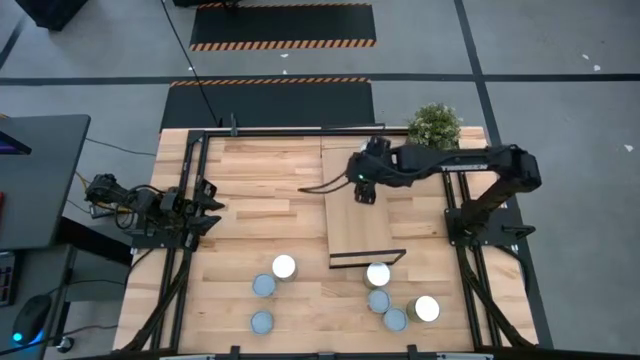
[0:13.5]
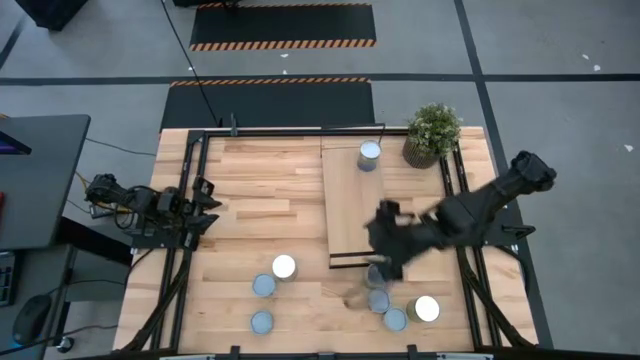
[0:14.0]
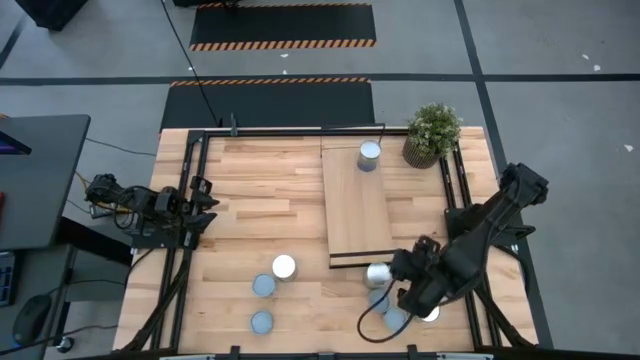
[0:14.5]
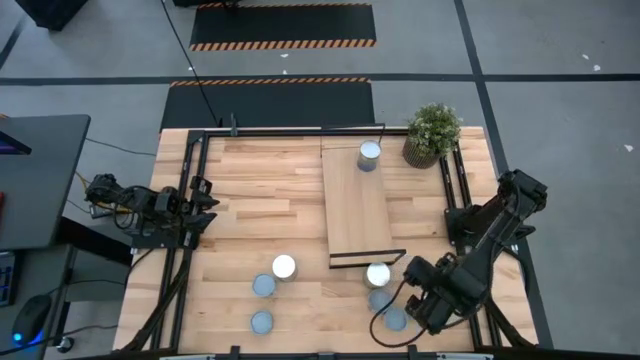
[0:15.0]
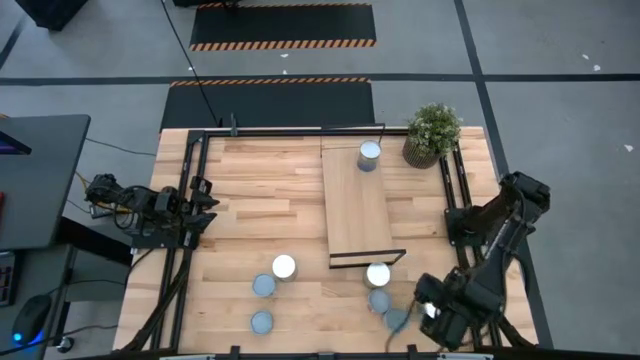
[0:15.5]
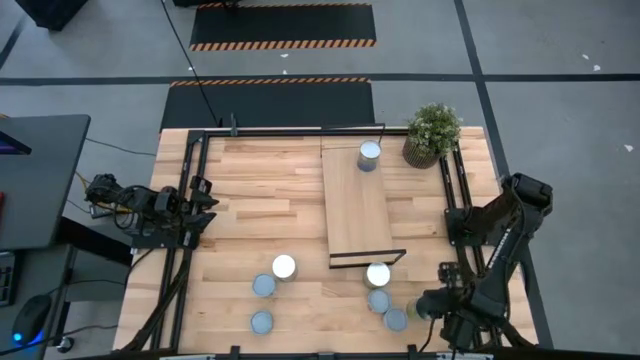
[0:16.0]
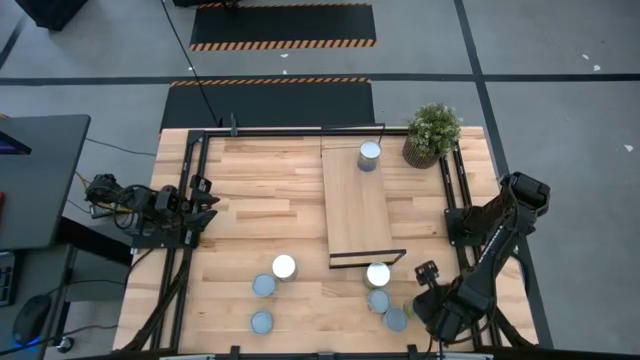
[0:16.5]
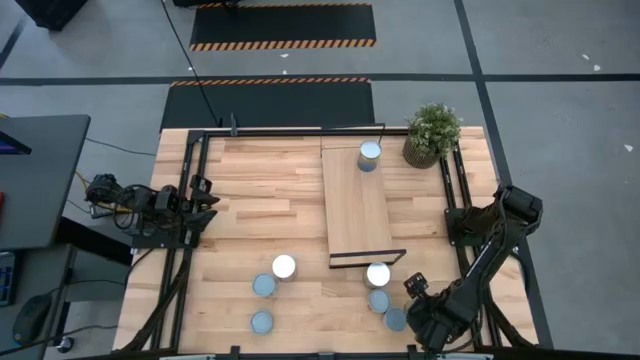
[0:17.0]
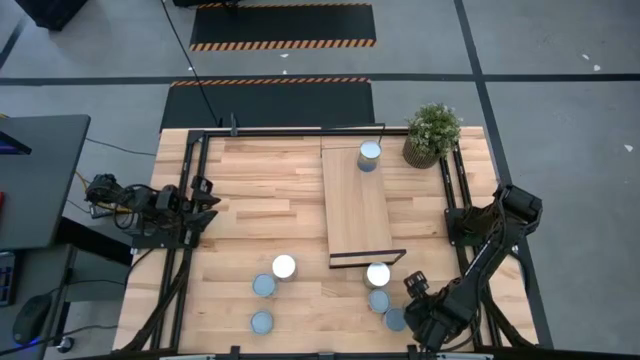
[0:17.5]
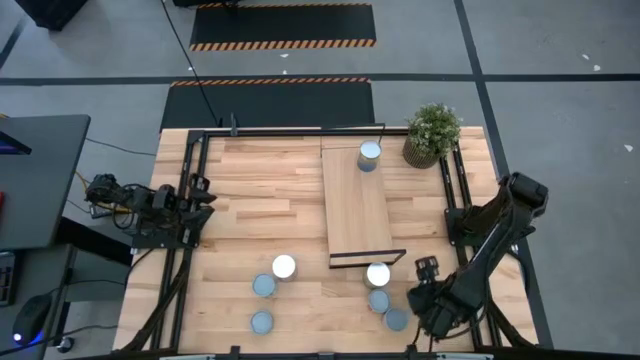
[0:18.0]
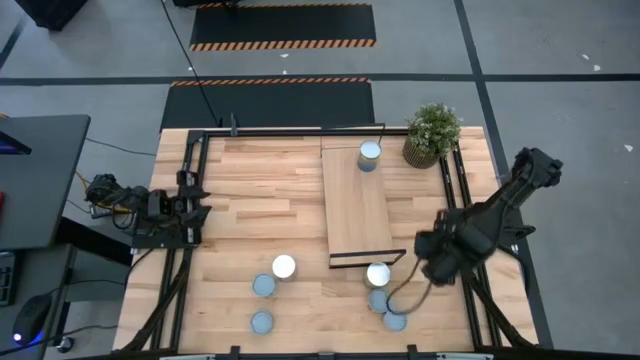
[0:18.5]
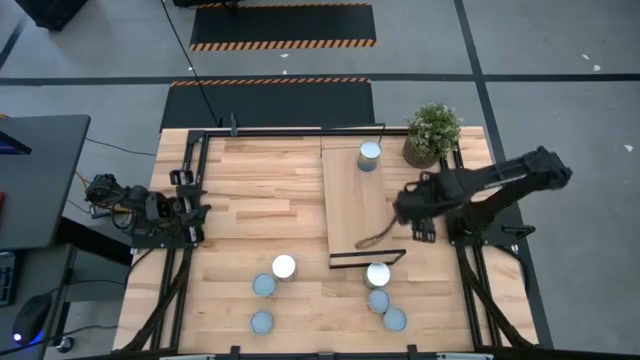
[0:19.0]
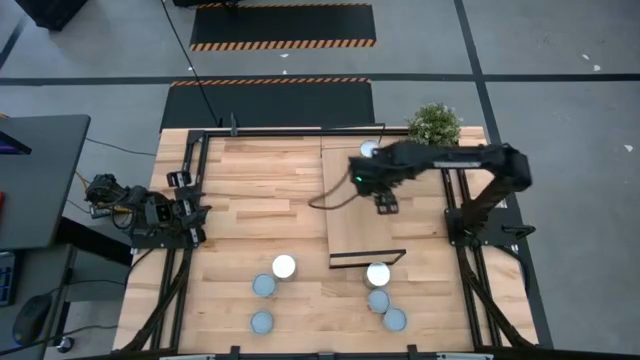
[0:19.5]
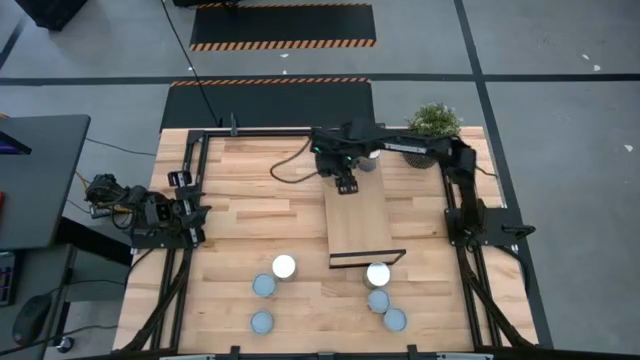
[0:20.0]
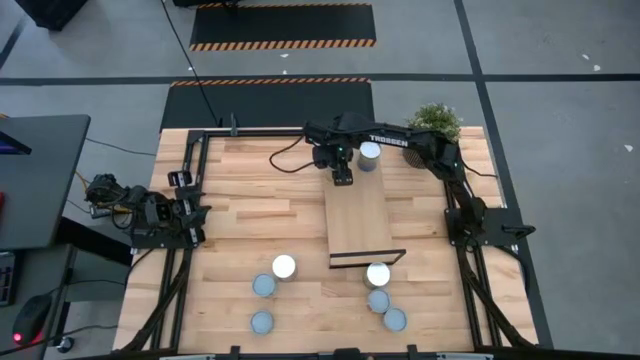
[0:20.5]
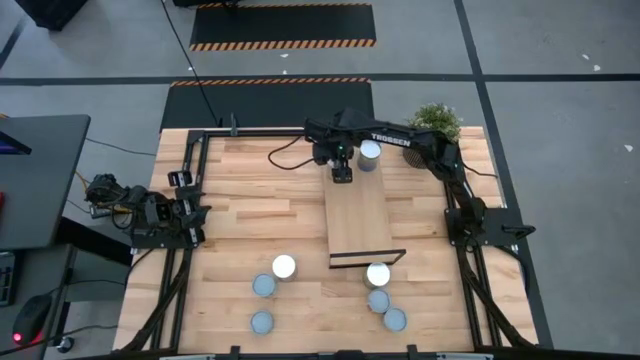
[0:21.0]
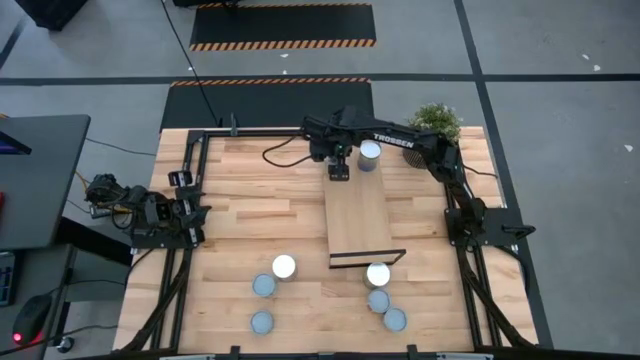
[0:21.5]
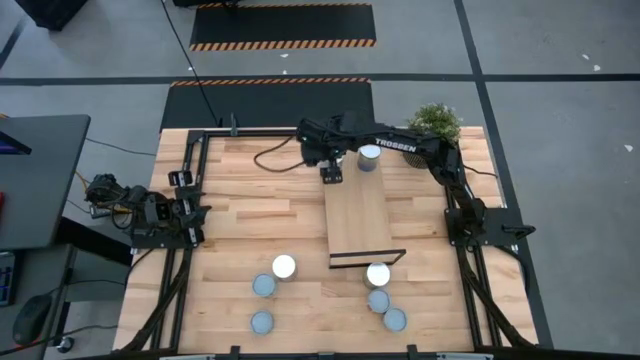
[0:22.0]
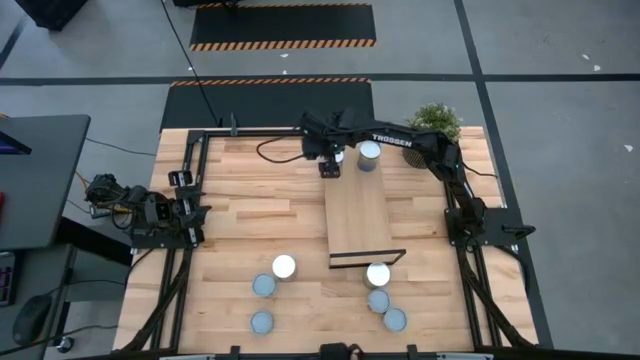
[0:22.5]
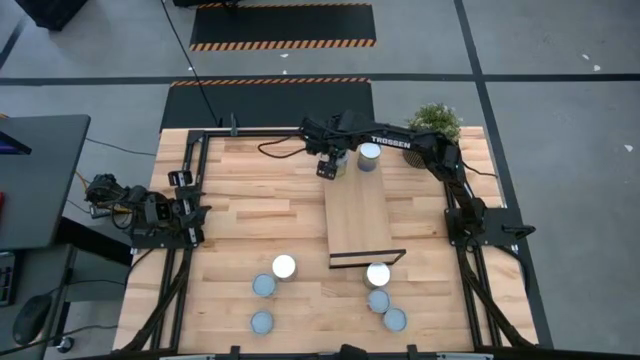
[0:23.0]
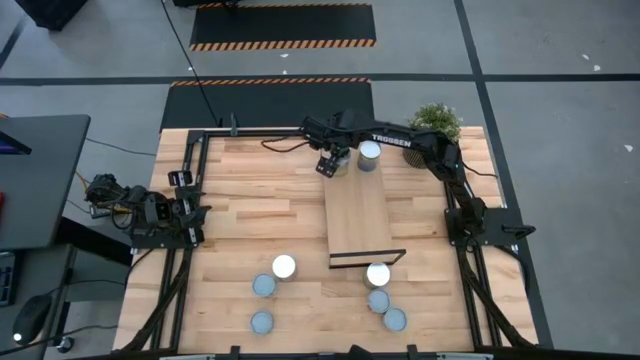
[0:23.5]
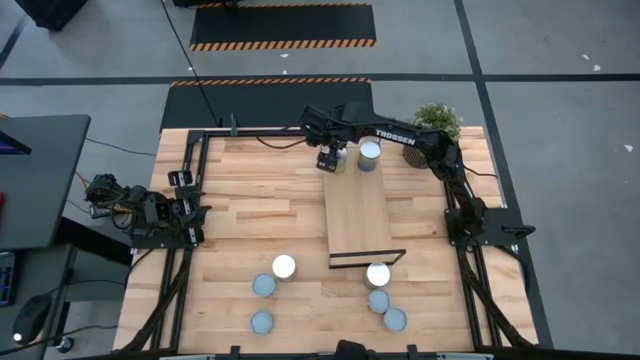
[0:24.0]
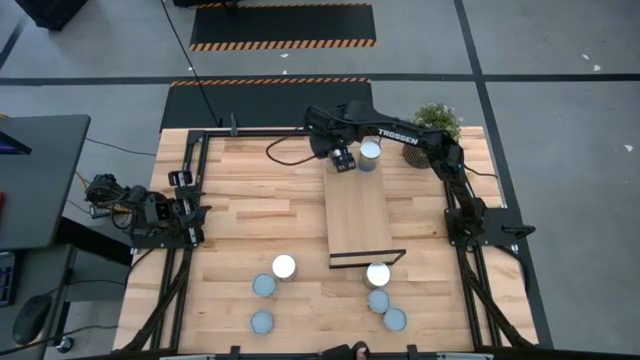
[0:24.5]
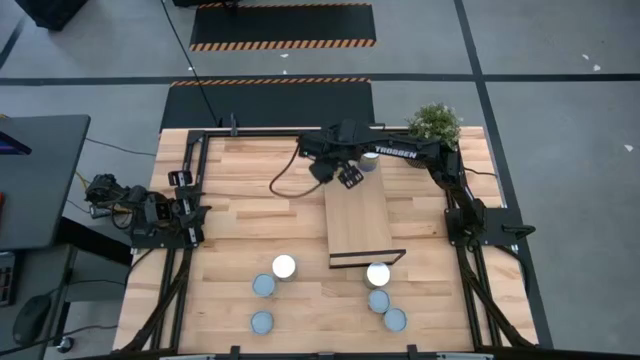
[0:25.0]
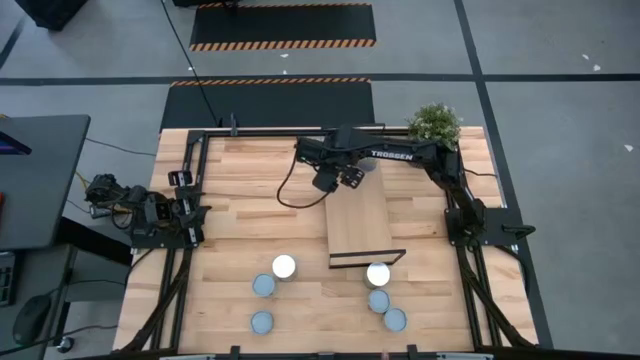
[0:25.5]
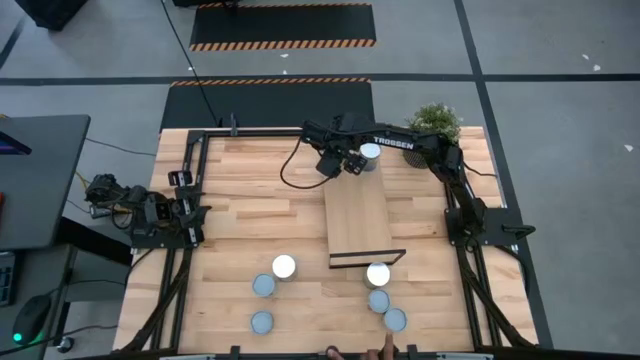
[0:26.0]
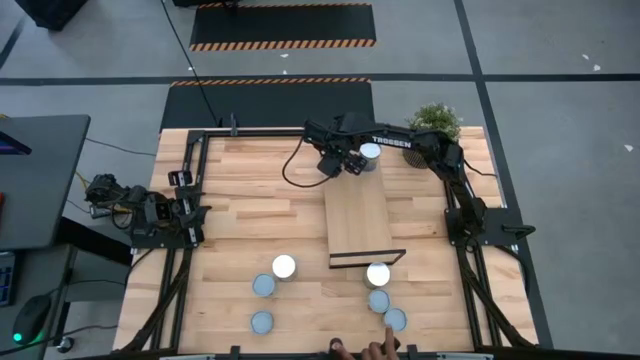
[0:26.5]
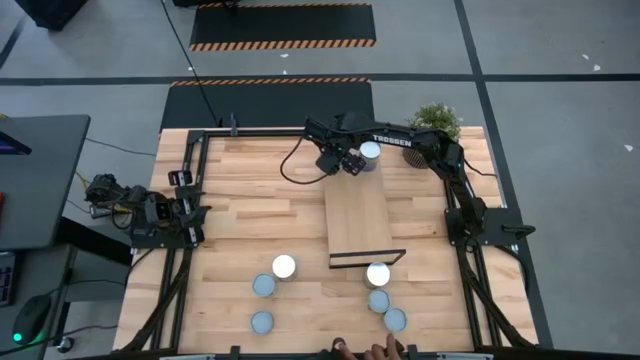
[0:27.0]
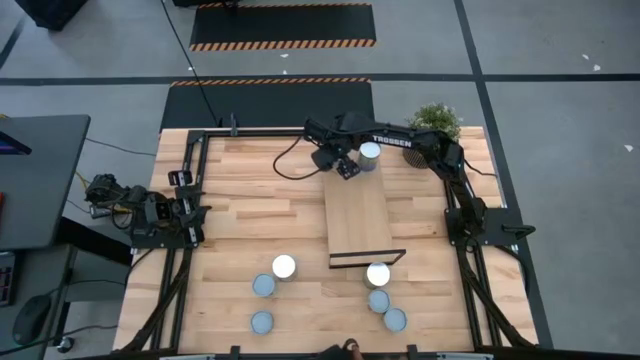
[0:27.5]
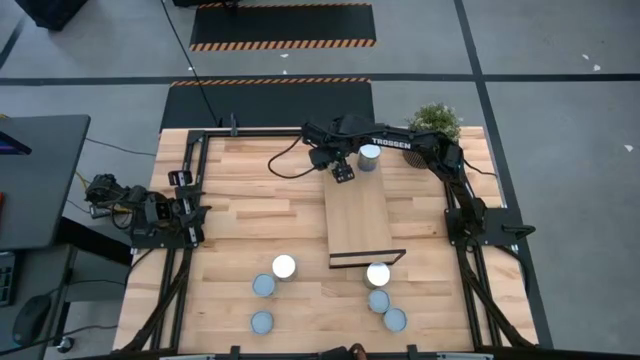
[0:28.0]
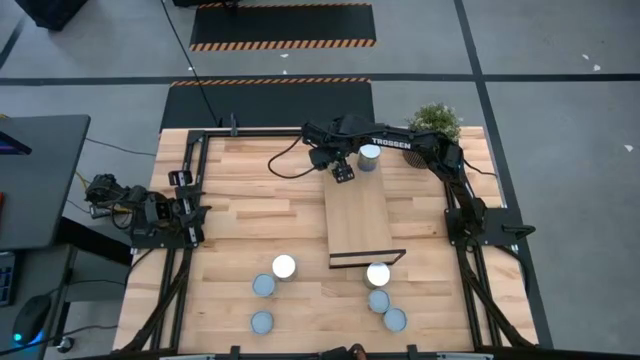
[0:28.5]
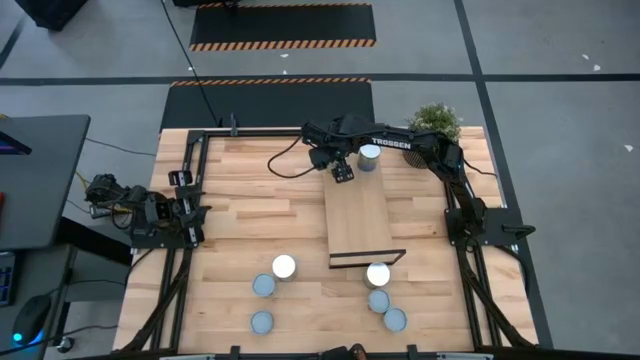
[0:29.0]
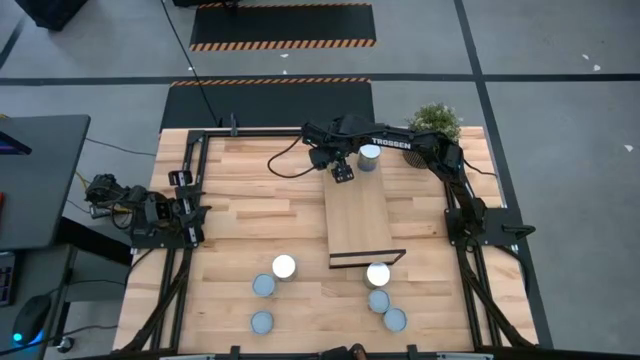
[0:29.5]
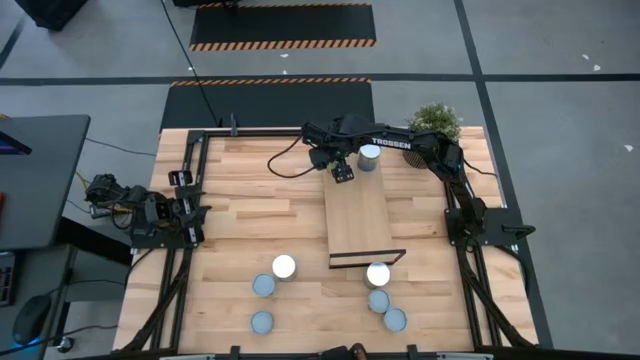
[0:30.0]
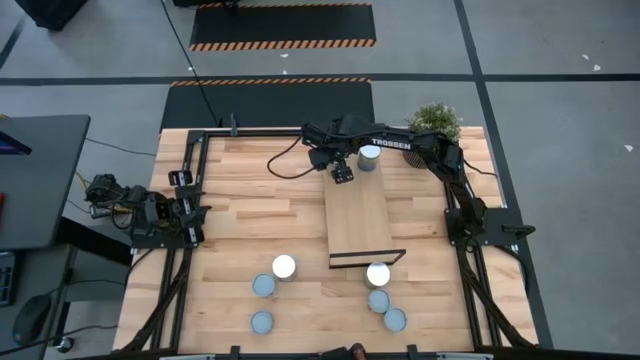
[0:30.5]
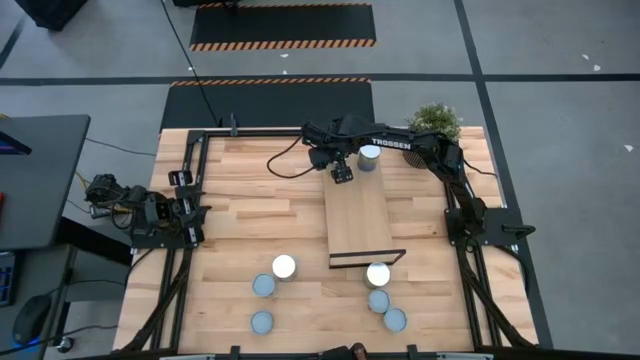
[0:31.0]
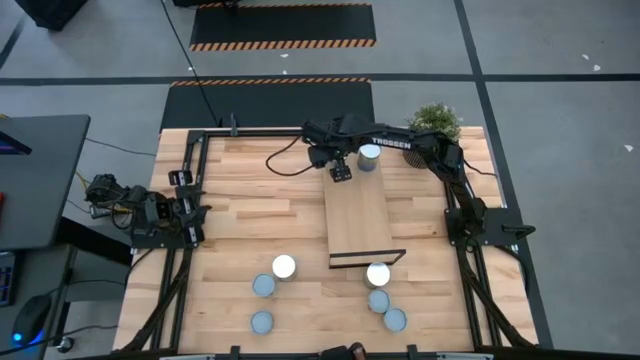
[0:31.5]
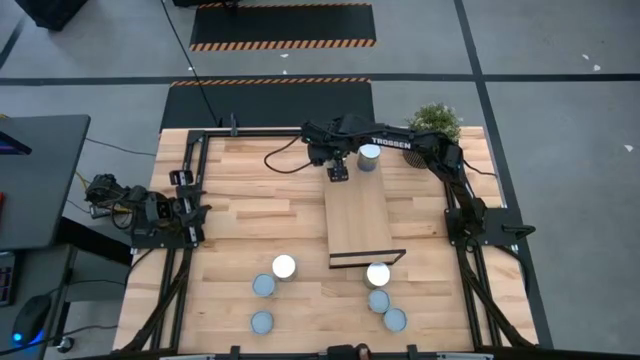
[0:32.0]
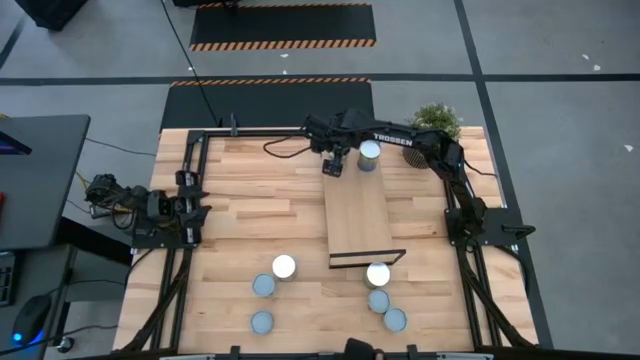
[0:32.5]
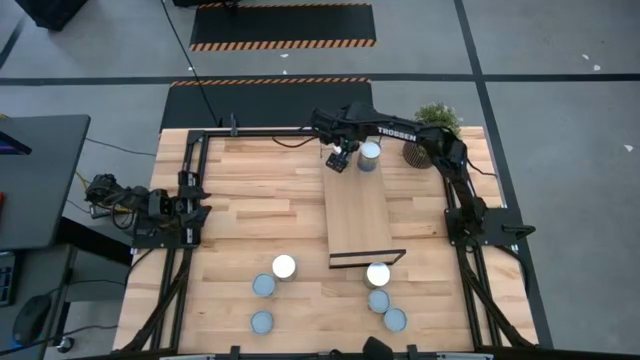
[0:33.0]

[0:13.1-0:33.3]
Task: Pick and place cans onto a shelf
Put the canned carrots on the shelf

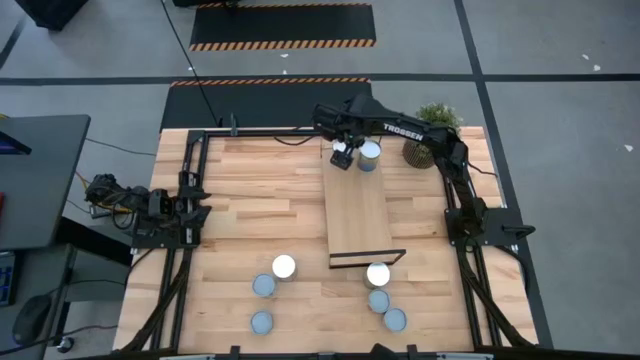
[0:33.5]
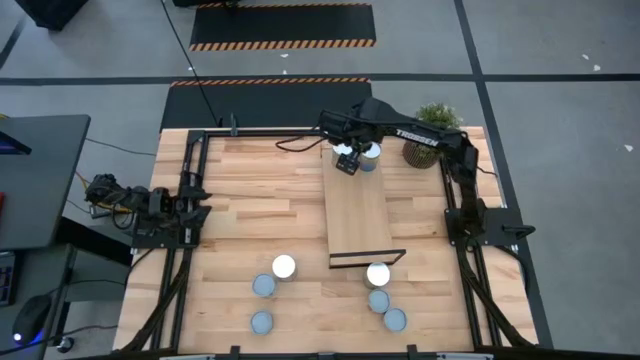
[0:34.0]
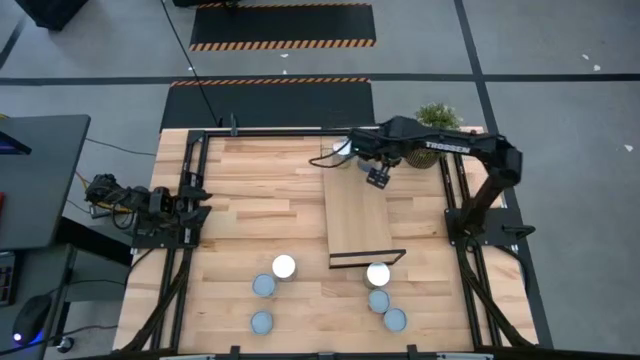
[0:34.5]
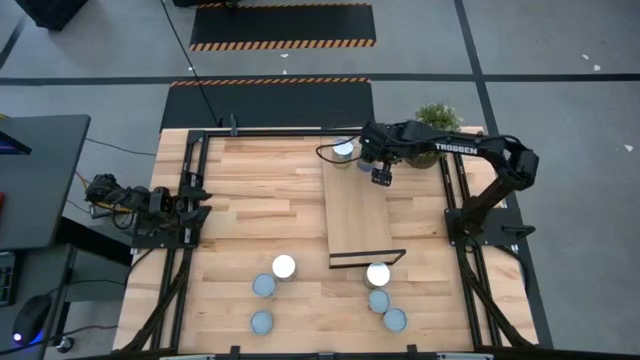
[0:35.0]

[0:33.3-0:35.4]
Adjust the canned peaches on the shelf
